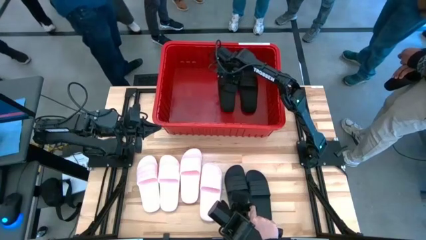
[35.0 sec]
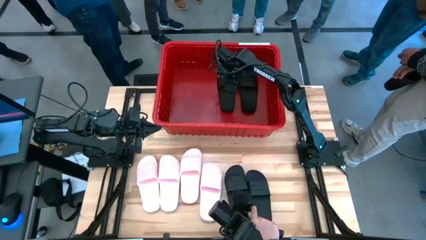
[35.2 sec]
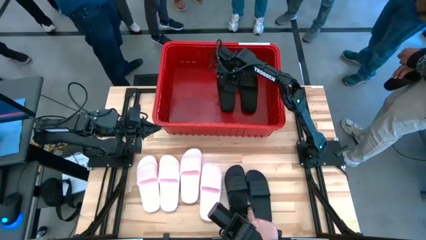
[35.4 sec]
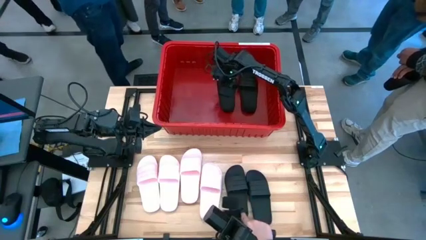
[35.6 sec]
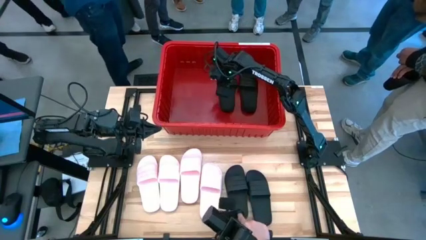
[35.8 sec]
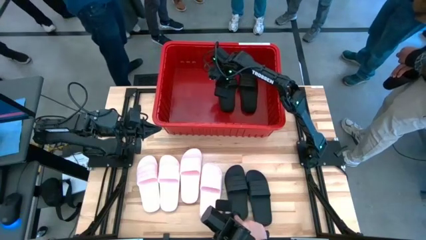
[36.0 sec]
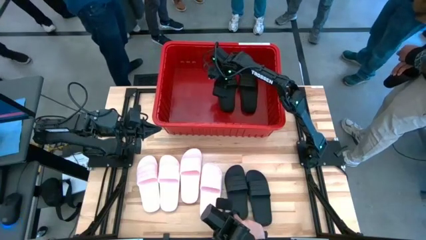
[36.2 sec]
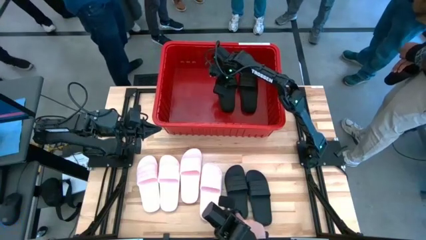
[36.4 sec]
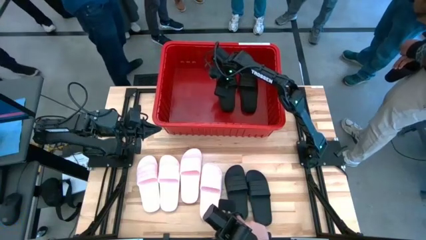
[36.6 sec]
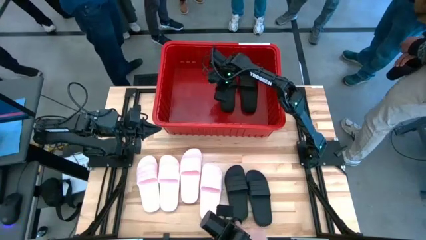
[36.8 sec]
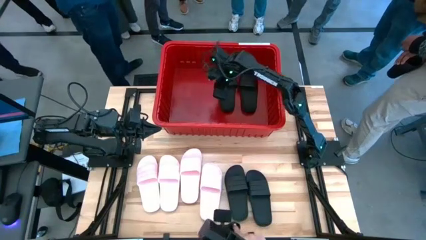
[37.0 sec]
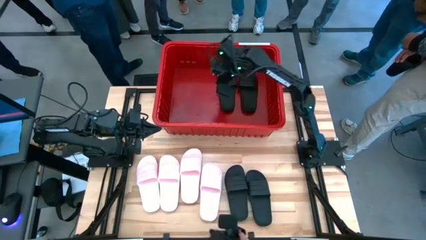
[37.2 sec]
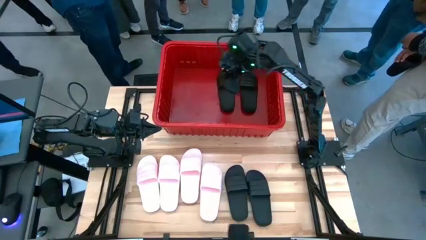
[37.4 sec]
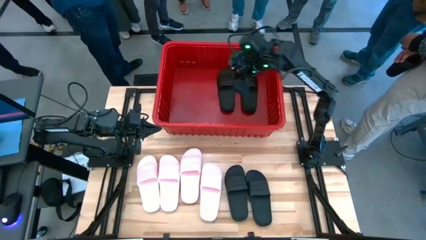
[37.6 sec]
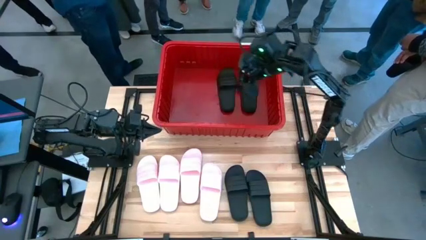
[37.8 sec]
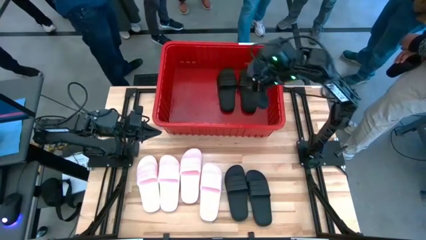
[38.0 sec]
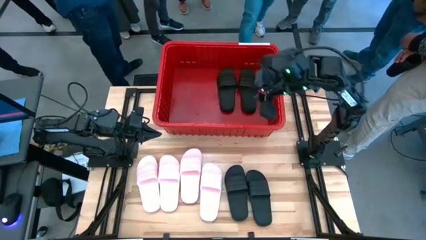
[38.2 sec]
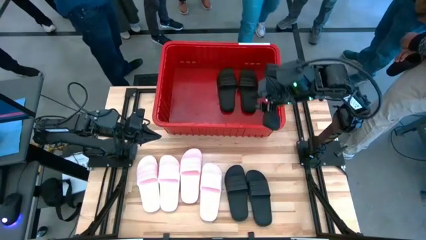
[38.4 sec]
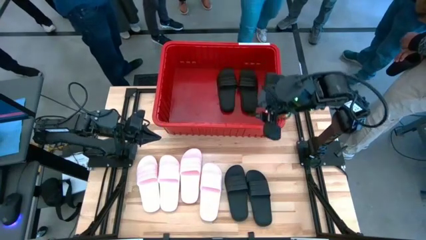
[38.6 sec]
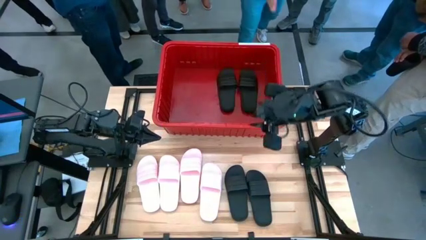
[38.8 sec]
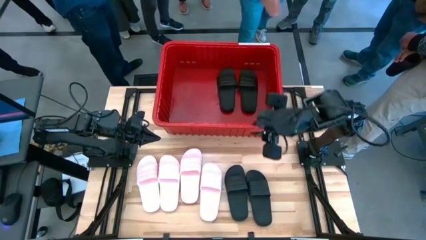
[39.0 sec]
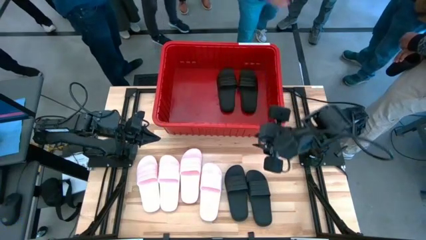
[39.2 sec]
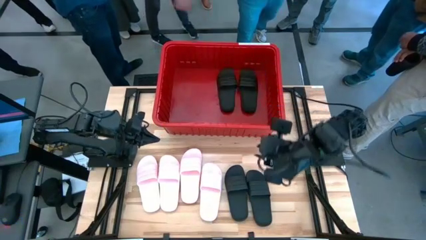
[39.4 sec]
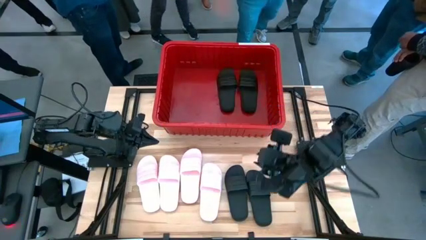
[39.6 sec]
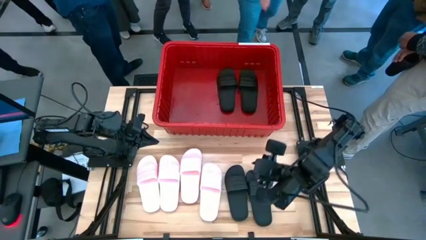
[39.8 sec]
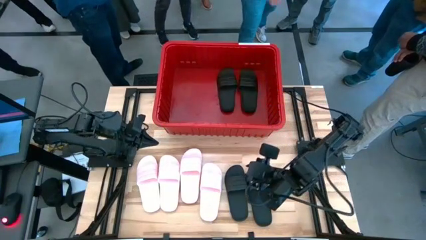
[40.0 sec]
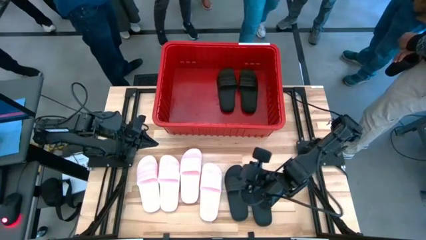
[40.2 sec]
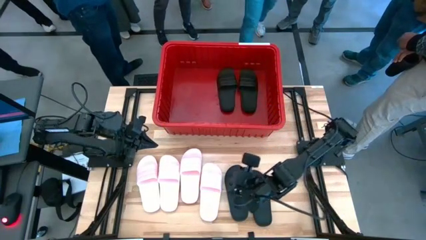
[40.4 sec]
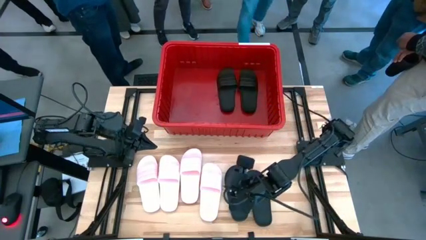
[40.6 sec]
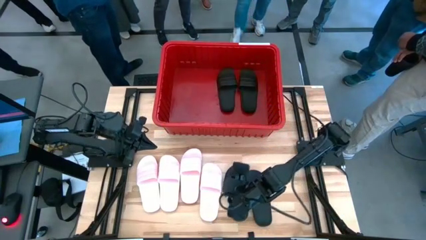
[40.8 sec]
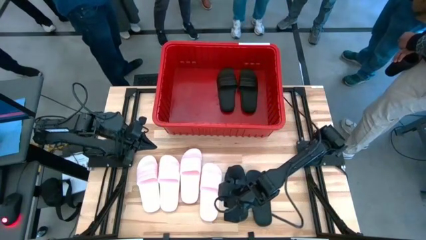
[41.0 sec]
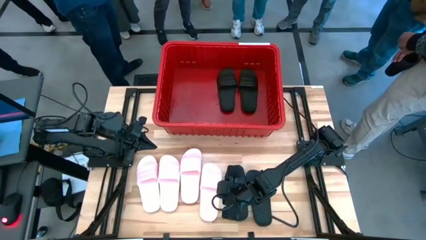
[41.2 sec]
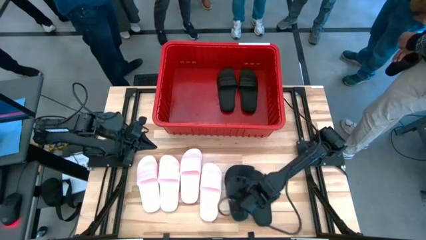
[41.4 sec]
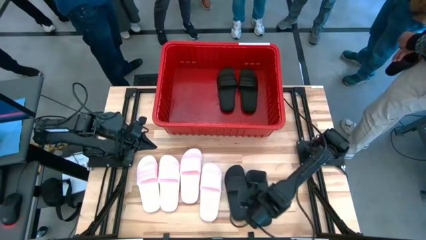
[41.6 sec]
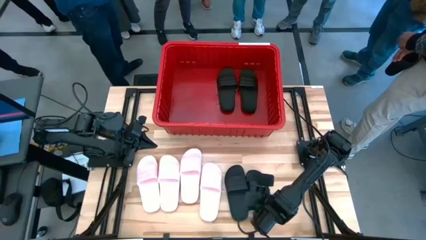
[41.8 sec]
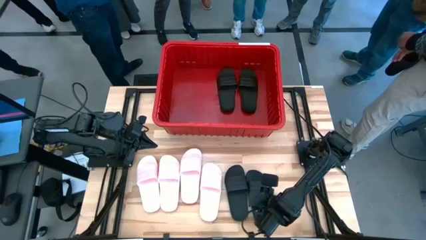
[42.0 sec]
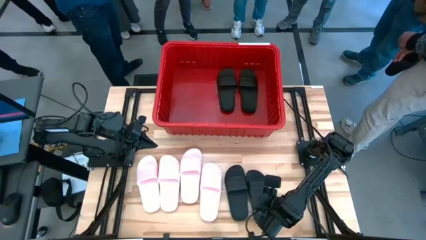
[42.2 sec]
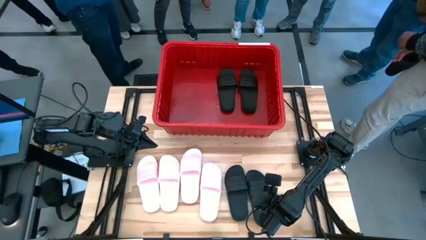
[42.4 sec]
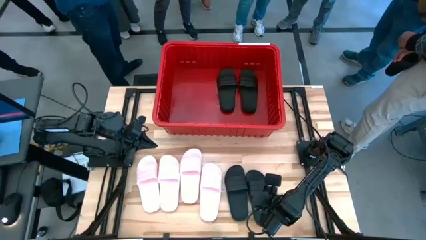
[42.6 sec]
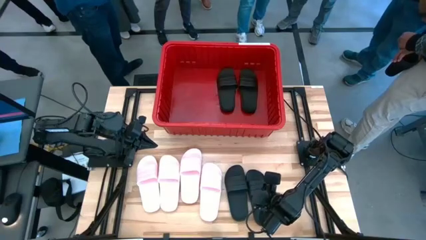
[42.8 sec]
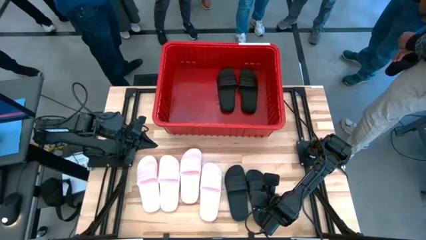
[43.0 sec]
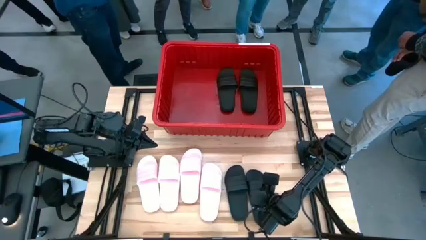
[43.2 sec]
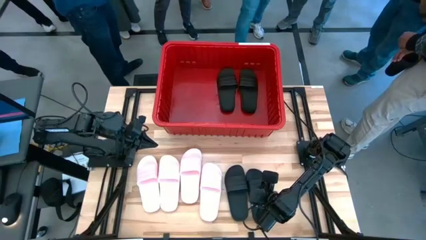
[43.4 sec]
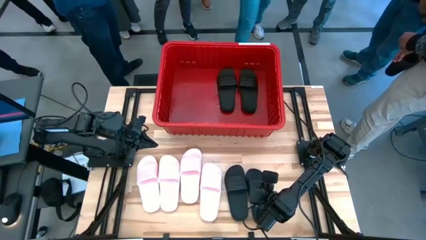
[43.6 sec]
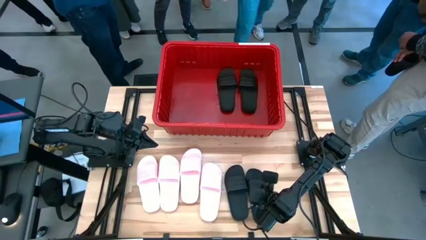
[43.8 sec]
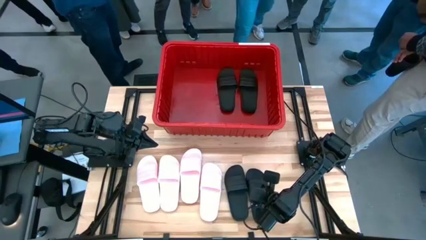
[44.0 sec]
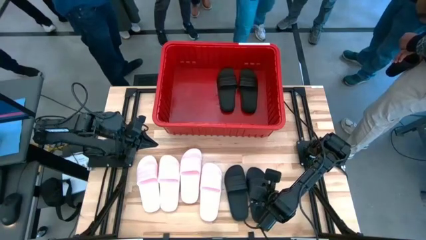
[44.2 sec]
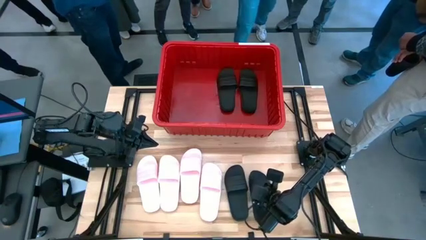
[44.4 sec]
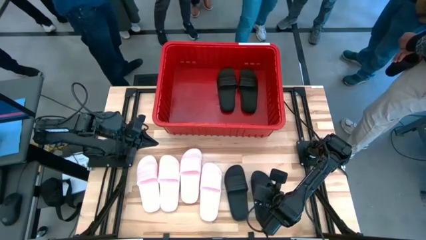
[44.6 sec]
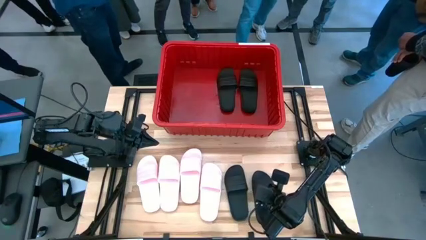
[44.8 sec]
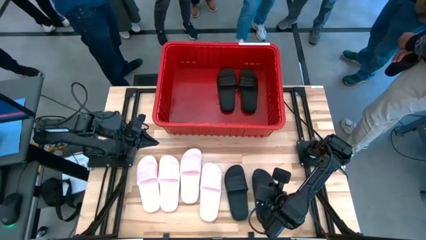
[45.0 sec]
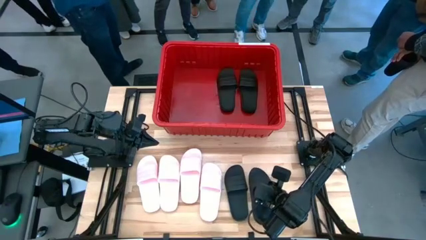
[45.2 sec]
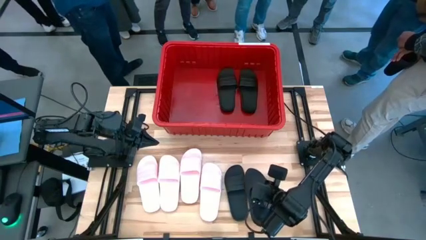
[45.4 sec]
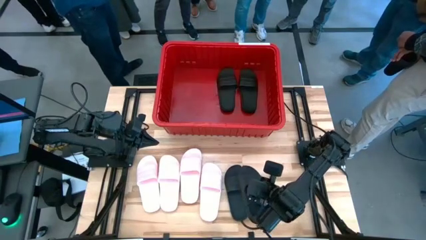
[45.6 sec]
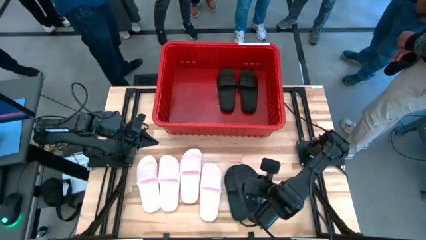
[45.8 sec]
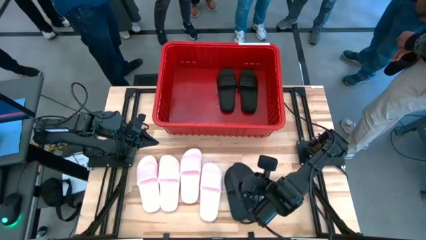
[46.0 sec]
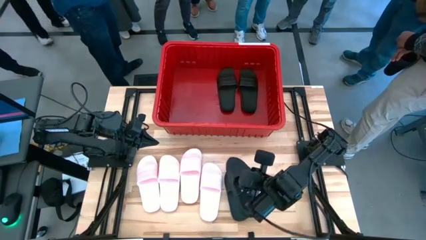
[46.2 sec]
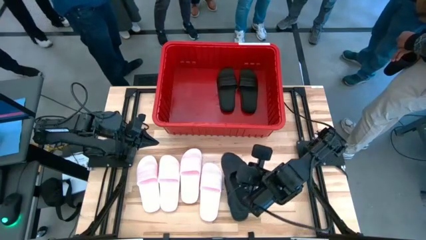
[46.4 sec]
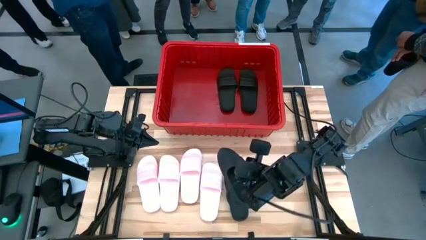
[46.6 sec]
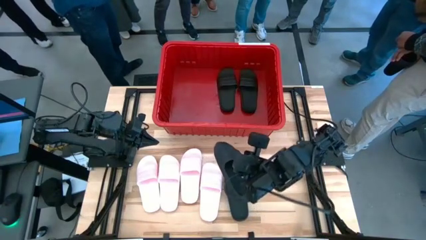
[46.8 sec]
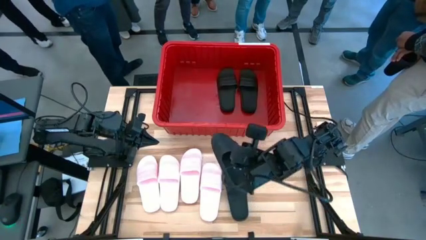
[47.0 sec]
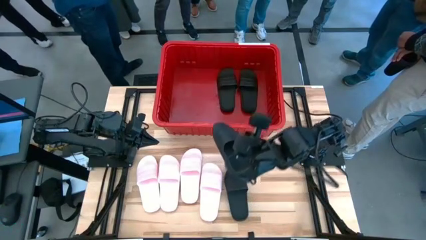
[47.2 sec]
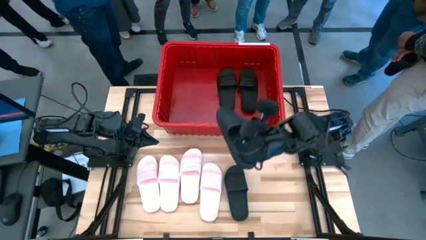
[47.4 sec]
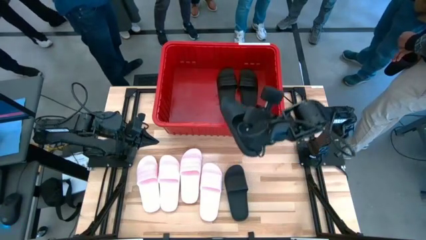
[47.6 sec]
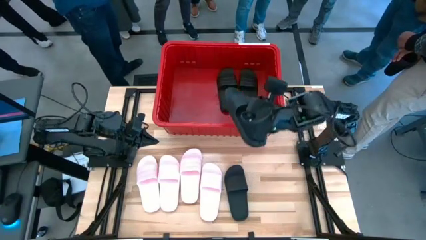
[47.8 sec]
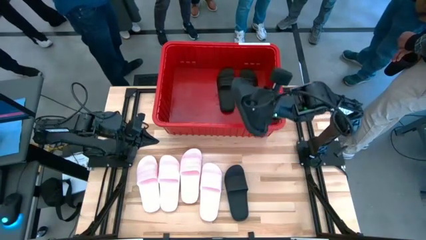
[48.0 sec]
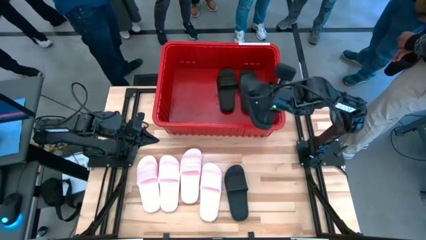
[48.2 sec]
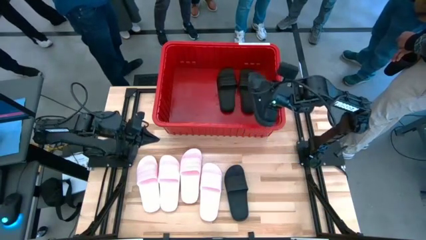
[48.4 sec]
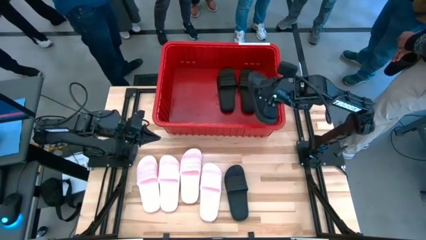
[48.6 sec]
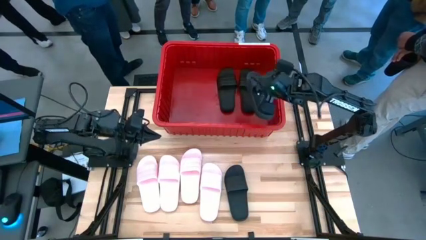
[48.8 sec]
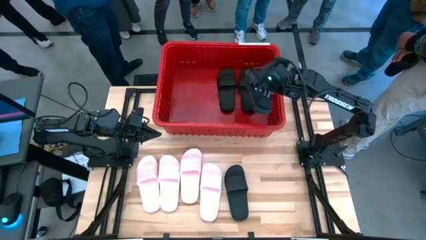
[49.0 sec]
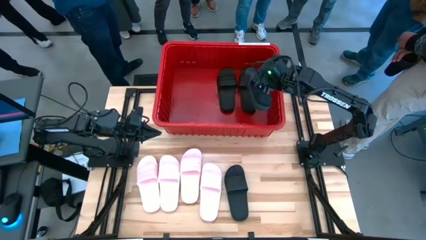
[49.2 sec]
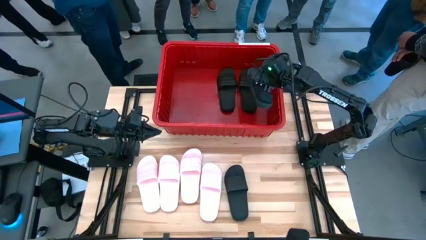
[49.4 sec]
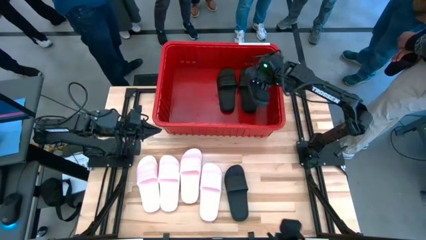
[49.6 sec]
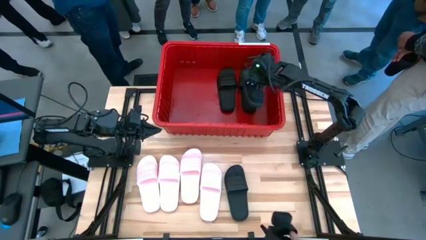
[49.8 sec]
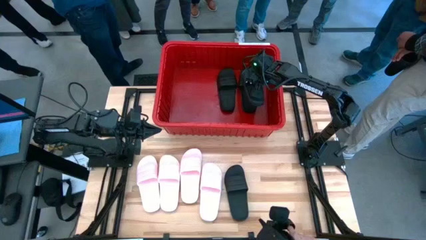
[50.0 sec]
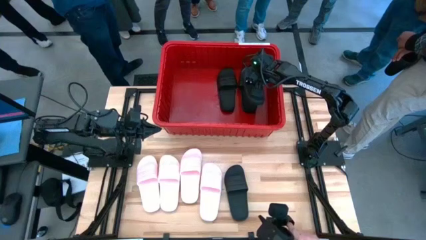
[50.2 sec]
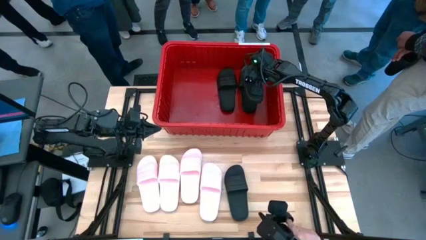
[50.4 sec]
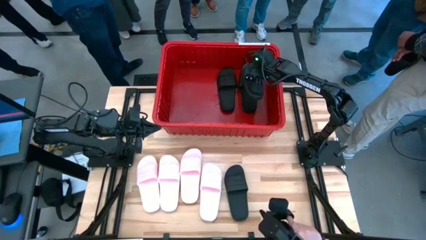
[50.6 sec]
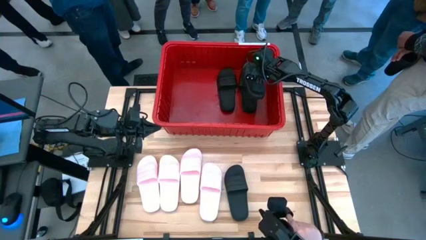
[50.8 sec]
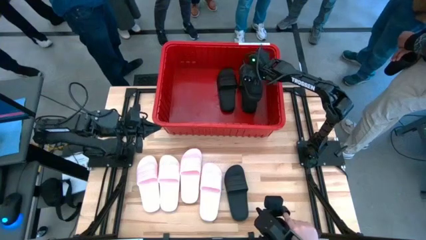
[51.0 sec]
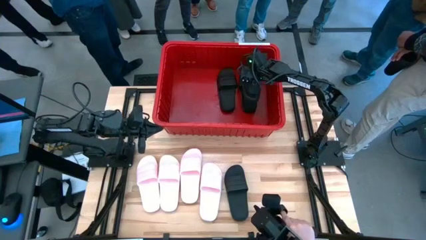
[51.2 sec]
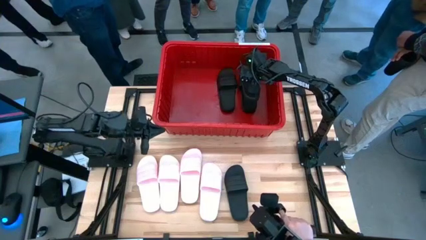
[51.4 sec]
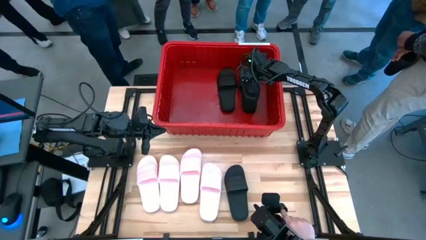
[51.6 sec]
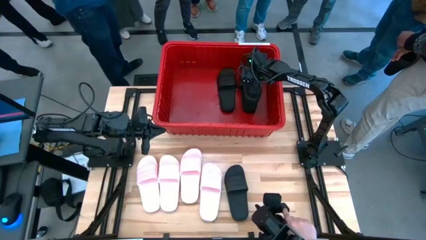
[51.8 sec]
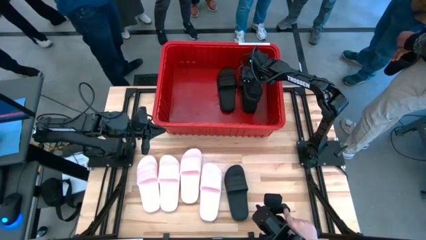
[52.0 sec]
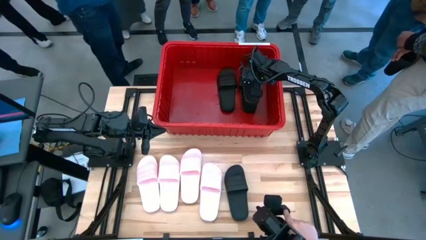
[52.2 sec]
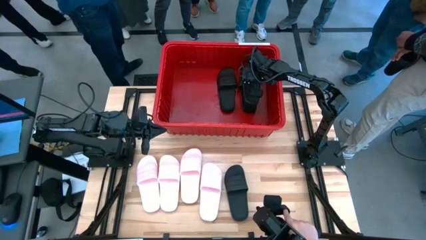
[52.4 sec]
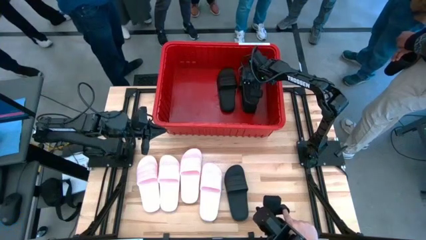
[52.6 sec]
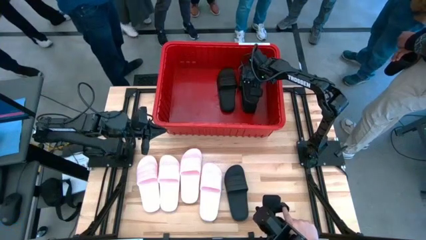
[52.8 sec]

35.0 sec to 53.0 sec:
Task: Pick and place slides into bin
Put the black slide into the red container
